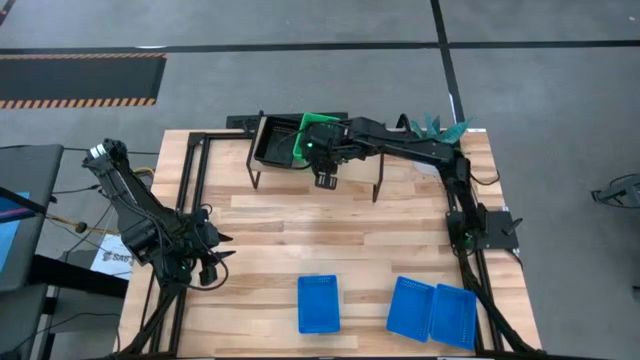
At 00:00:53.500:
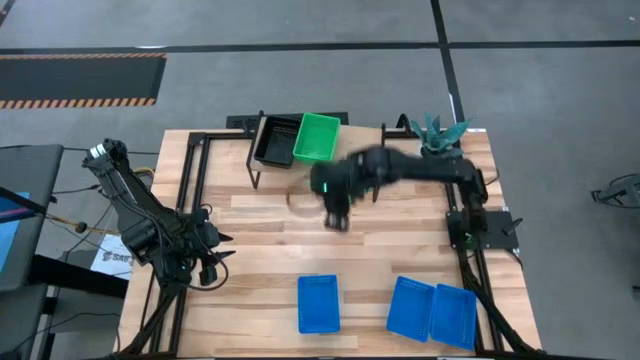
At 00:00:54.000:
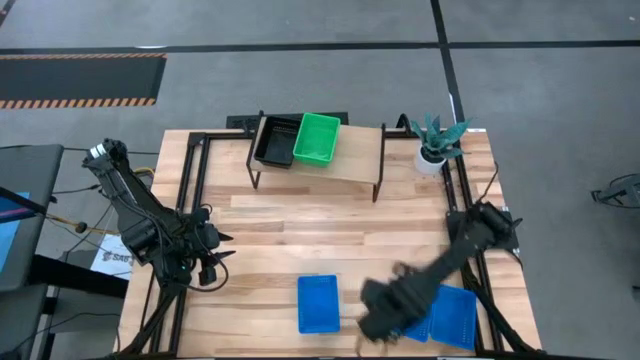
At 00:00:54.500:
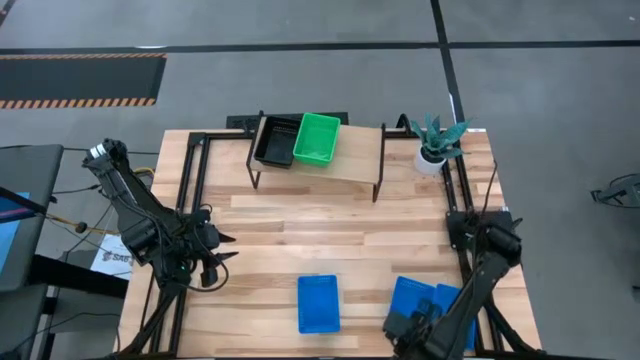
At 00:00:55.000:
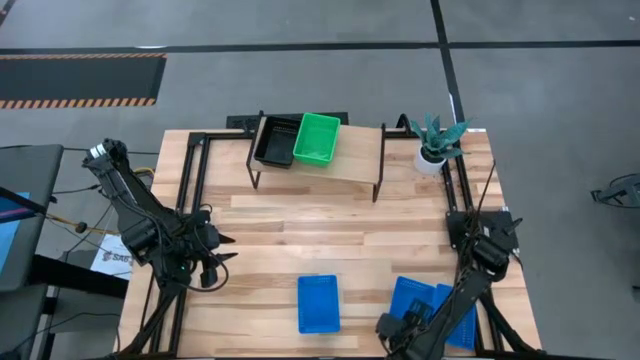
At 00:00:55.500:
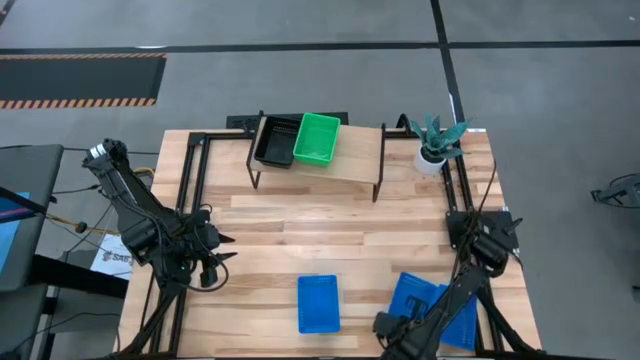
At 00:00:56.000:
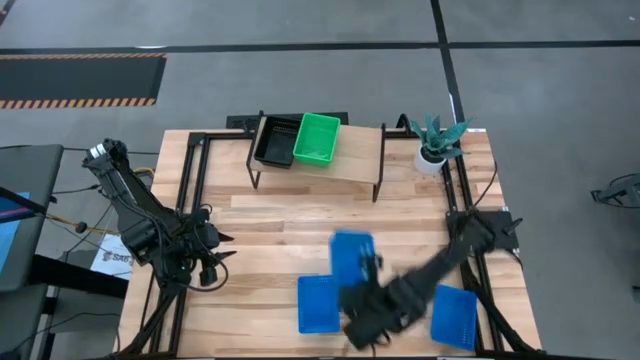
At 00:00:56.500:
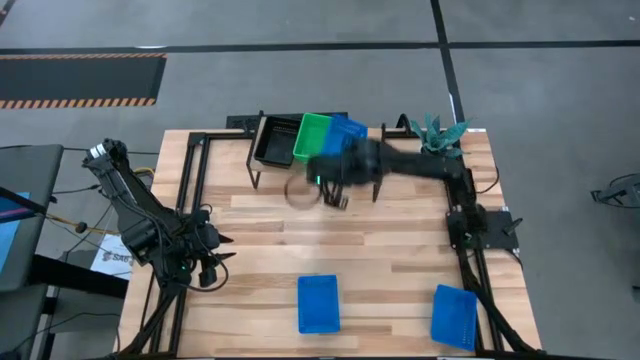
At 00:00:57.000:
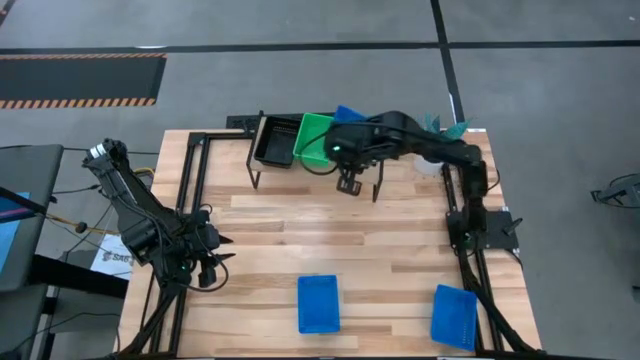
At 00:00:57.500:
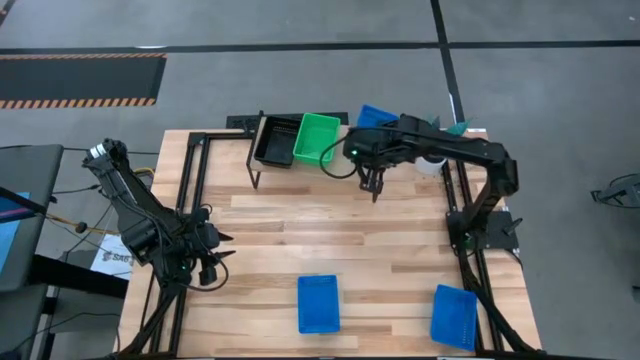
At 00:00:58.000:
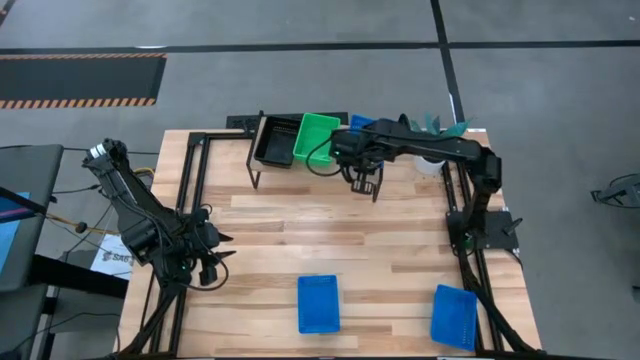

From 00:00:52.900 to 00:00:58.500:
Task: Stack baskets on shelf by color
Put the middle blue bin on the shelf

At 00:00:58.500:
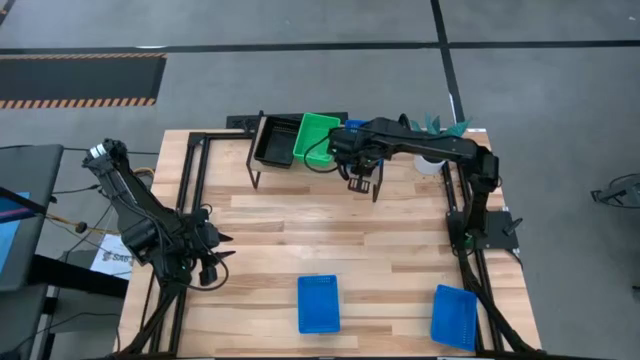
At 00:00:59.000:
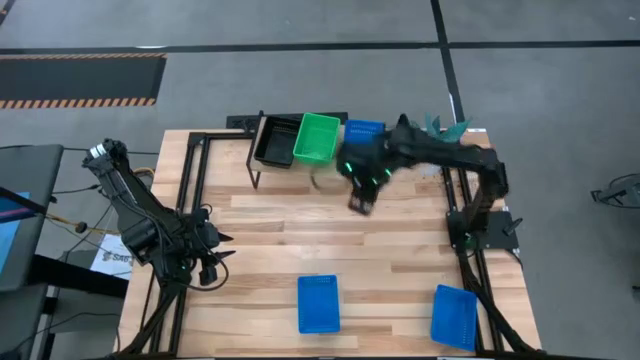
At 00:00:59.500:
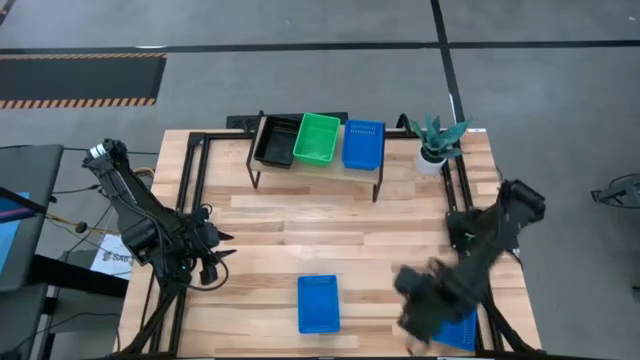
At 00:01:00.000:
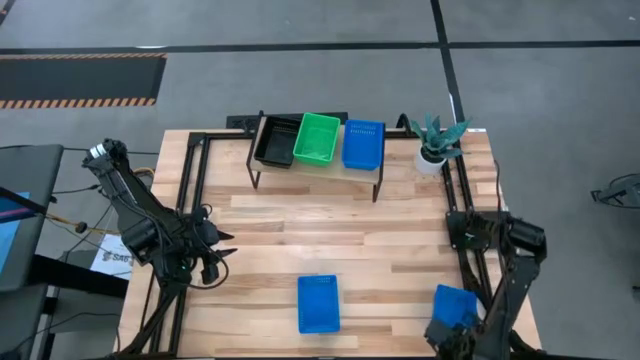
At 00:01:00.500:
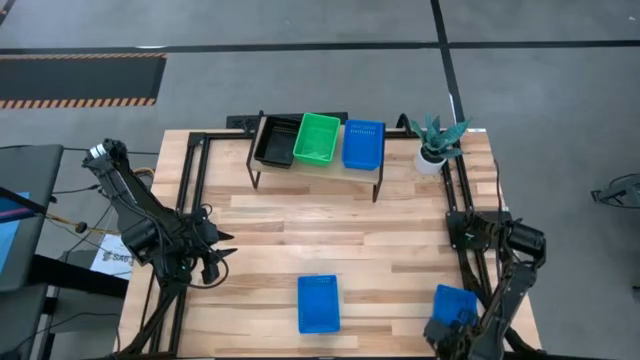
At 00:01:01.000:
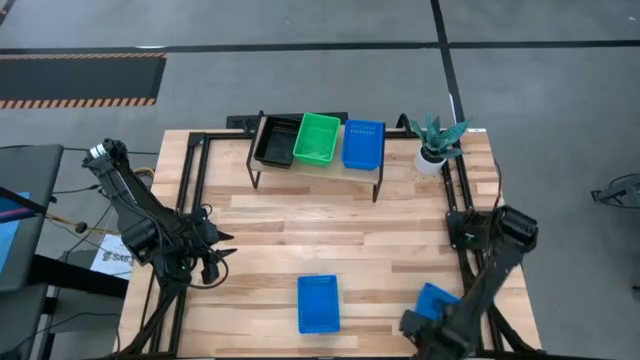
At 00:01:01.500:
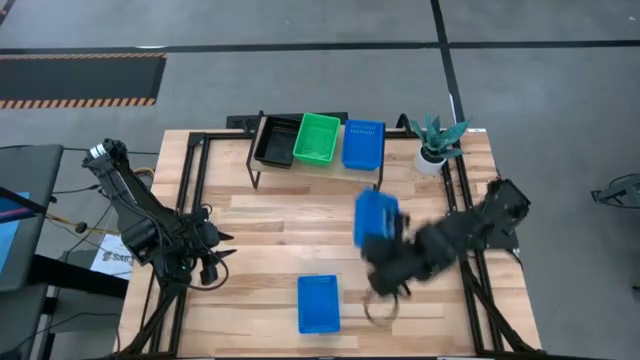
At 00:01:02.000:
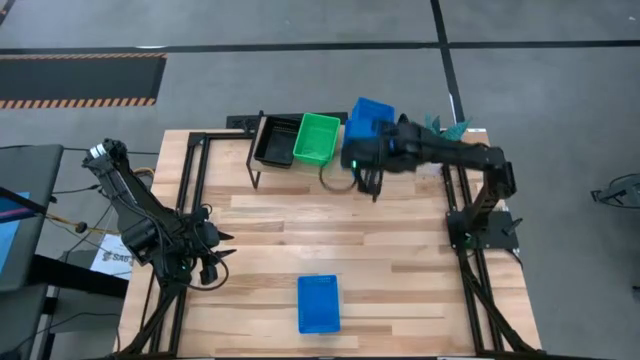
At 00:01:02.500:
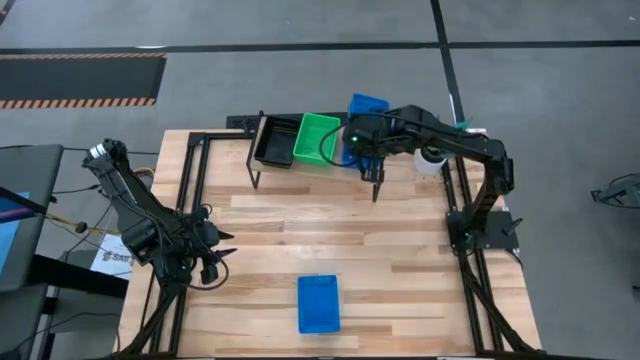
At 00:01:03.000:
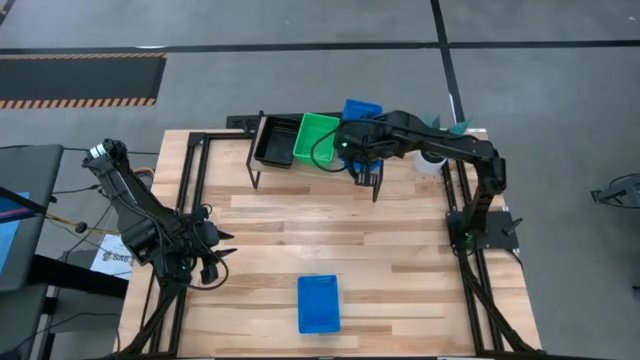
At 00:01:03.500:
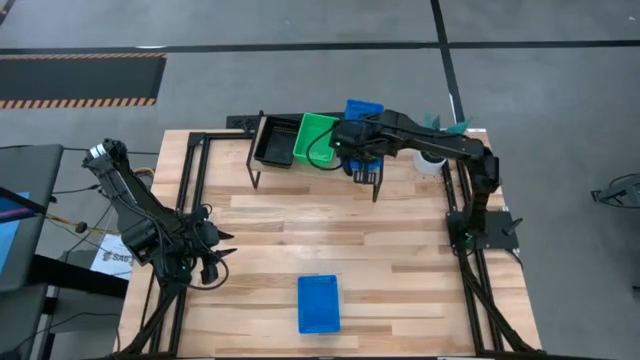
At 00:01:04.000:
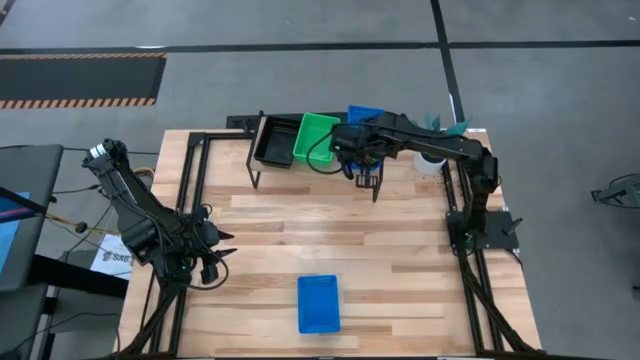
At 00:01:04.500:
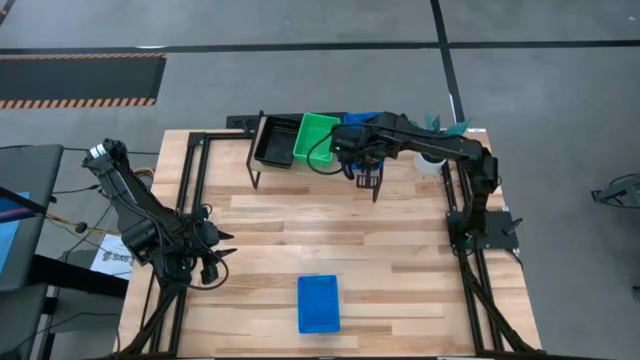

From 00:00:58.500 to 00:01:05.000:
Stack the right blue bin on the blue bin on the shelf

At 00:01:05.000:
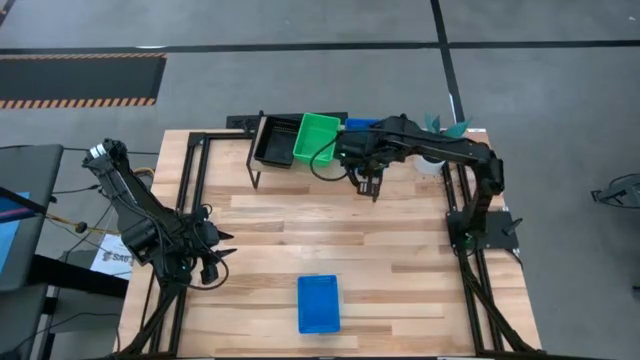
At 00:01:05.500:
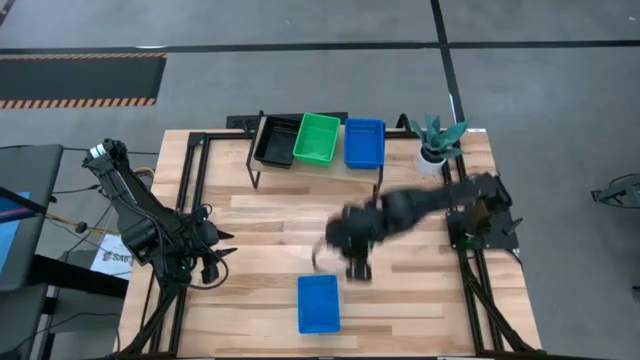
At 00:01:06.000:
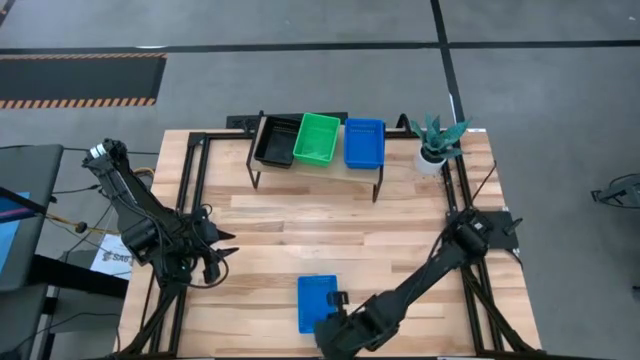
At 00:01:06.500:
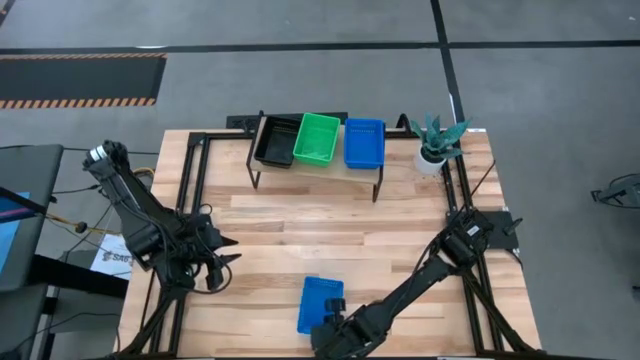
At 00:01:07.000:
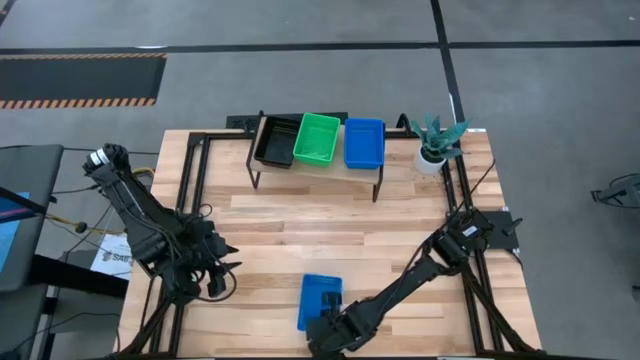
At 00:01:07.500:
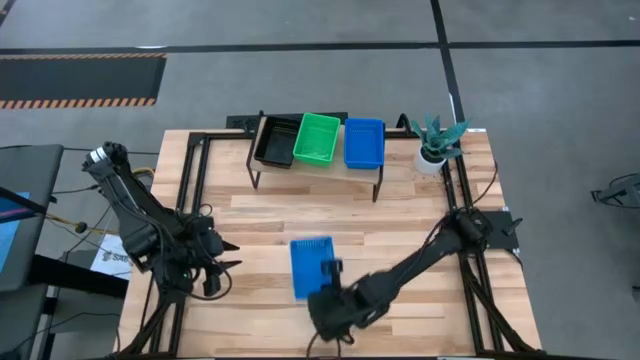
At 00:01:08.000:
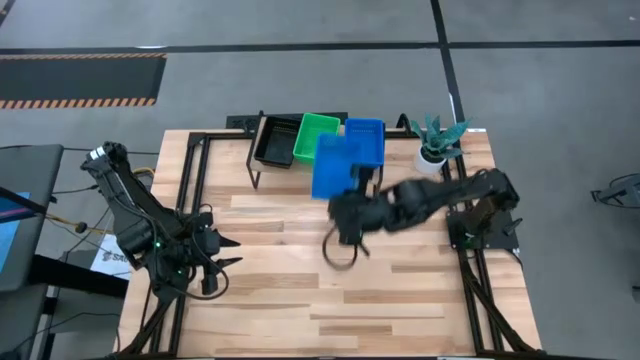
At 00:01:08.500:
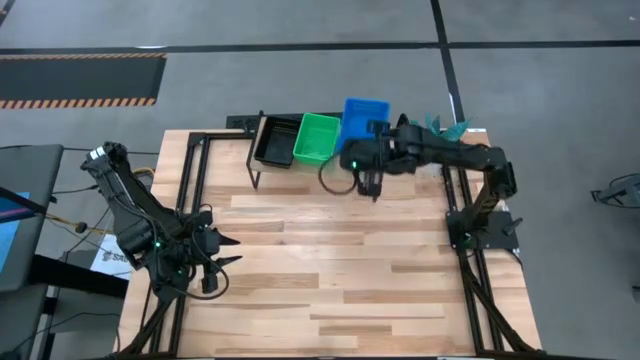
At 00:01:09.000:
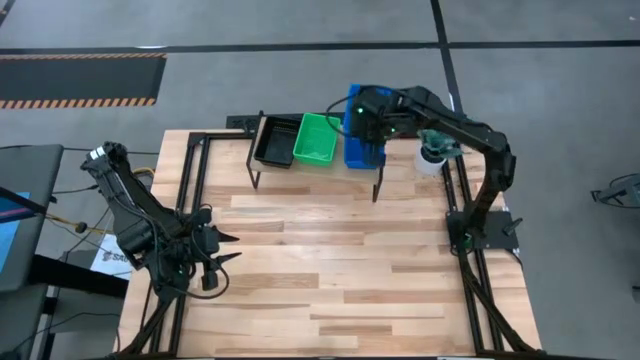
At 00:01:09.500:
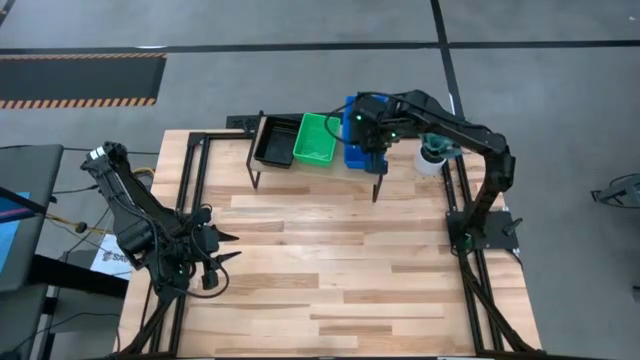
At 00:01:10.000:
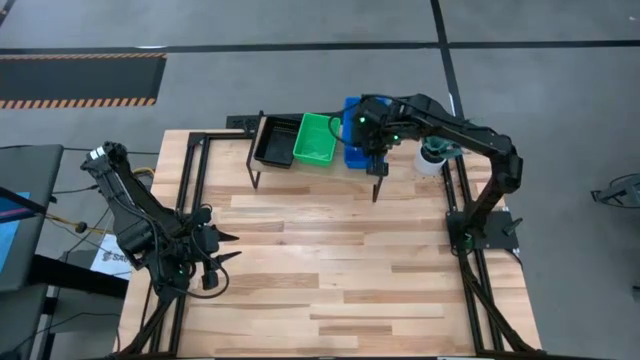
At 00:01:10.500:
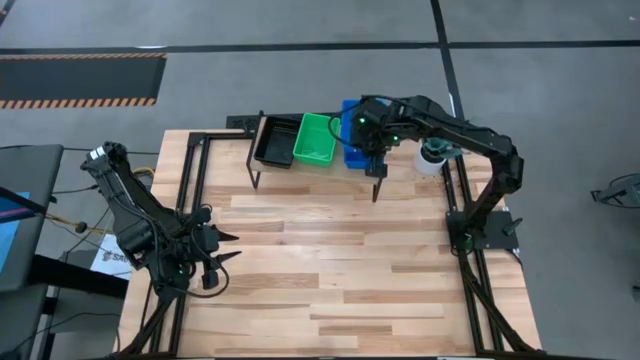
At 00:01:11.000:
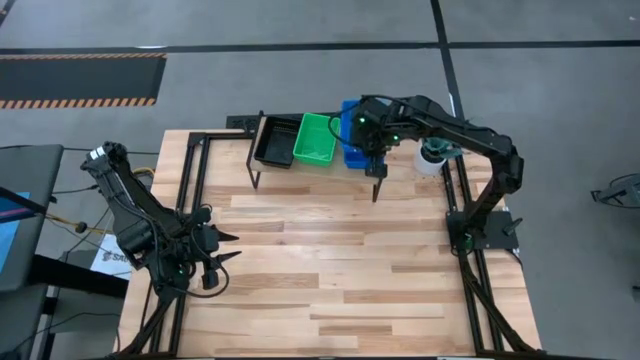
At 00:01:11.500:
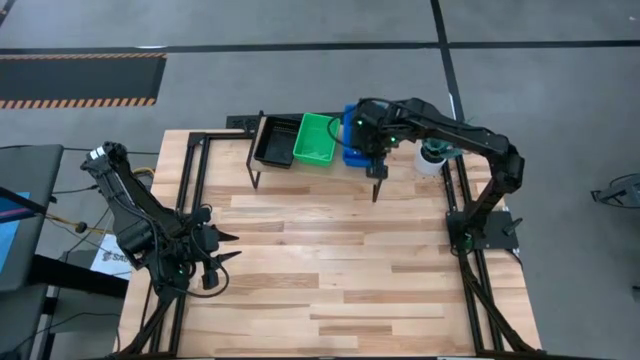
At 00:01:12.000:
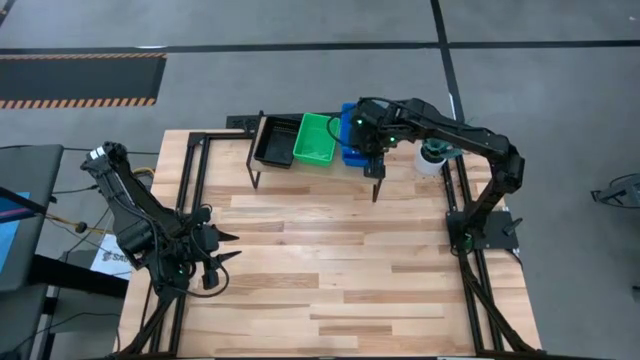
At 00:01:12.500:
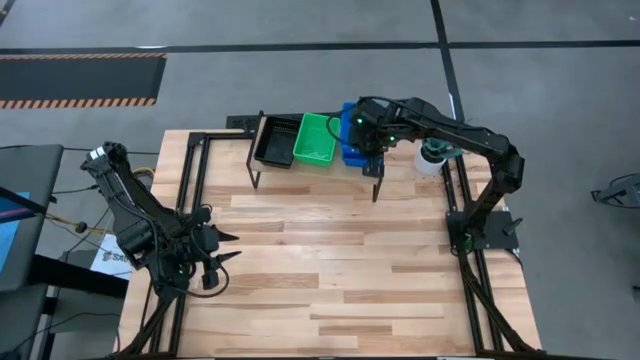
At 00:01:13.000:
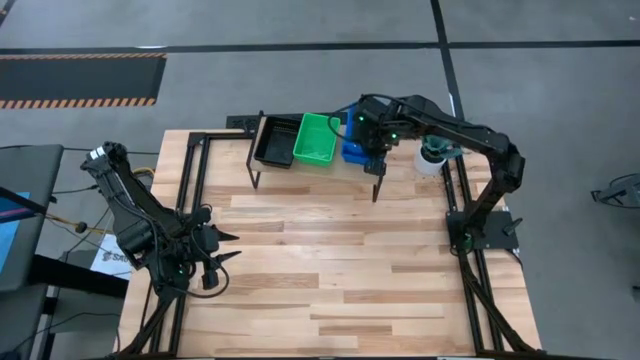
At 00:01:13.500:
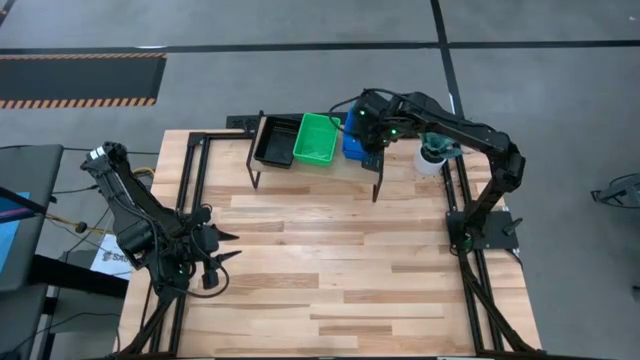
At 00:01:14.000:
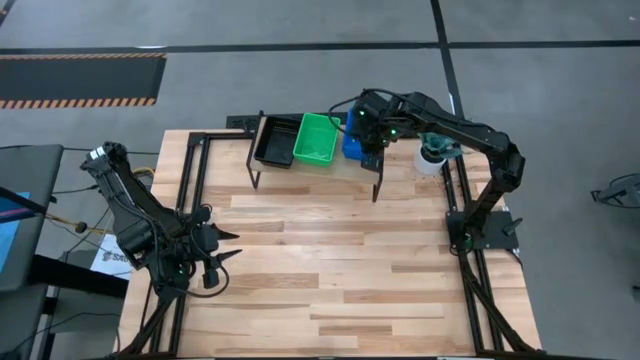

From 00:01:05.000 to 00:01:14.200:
Stack the blue bin on the blue bin on the shelf
